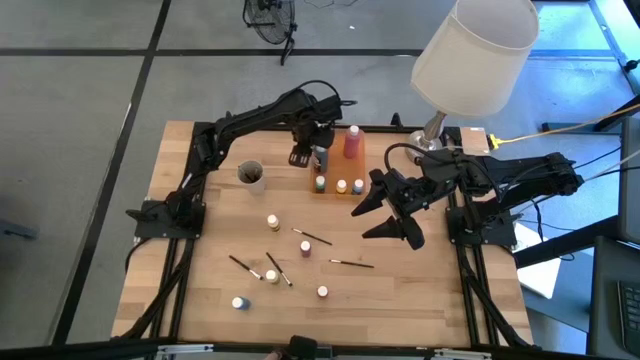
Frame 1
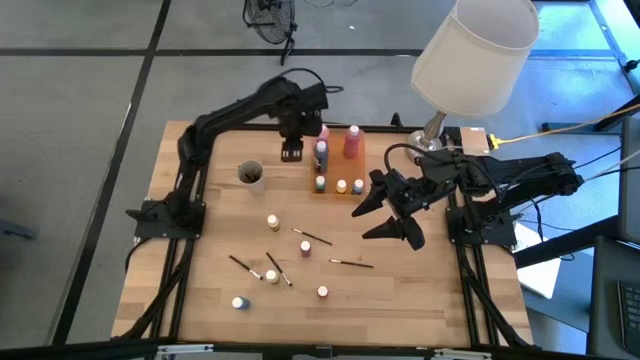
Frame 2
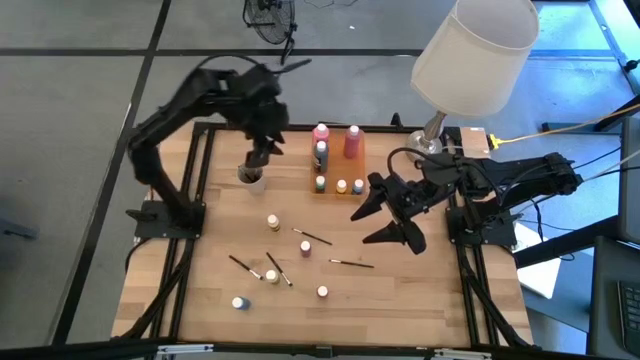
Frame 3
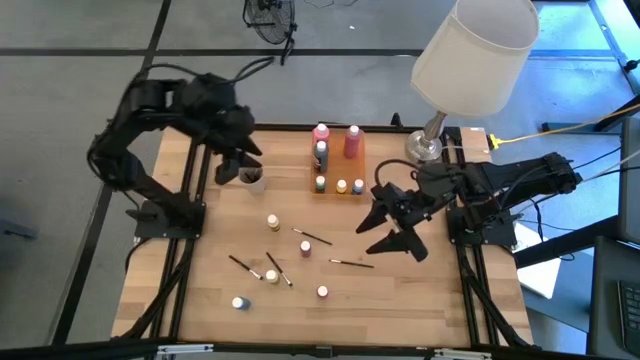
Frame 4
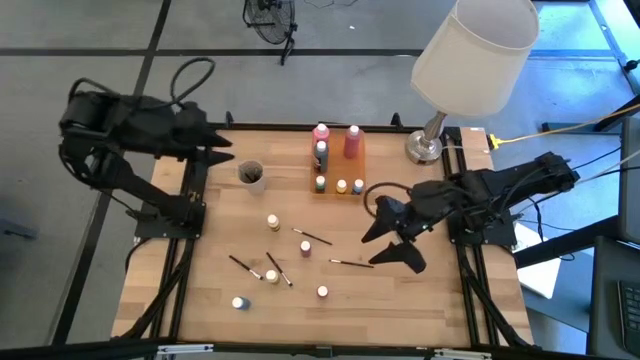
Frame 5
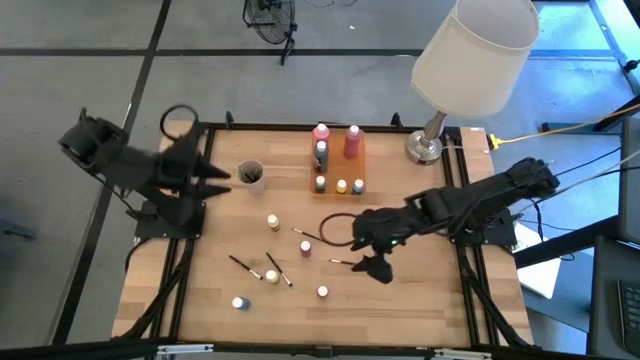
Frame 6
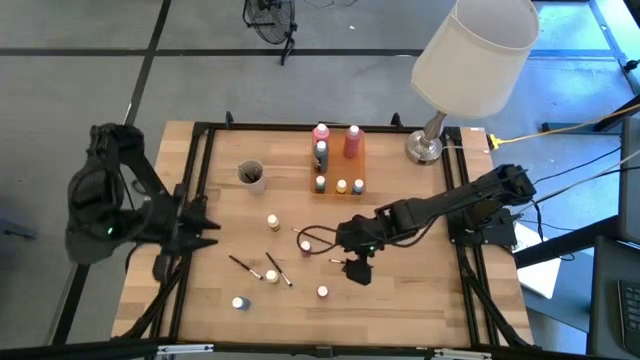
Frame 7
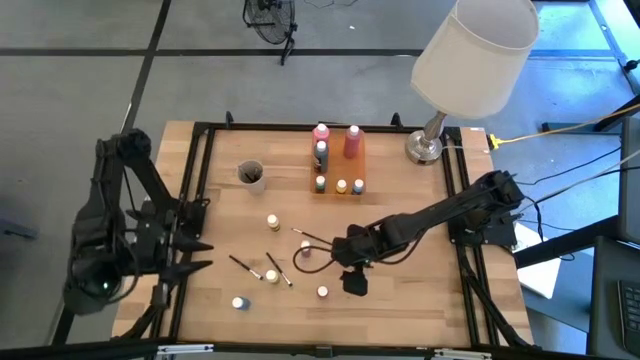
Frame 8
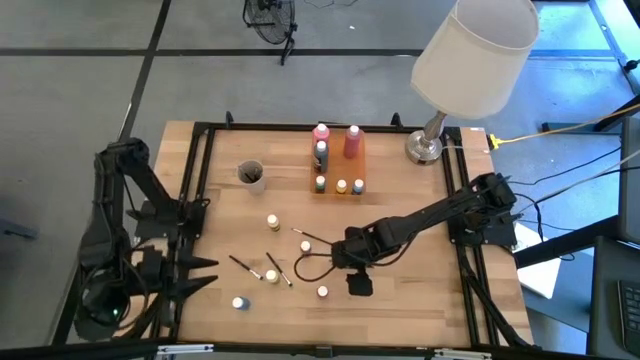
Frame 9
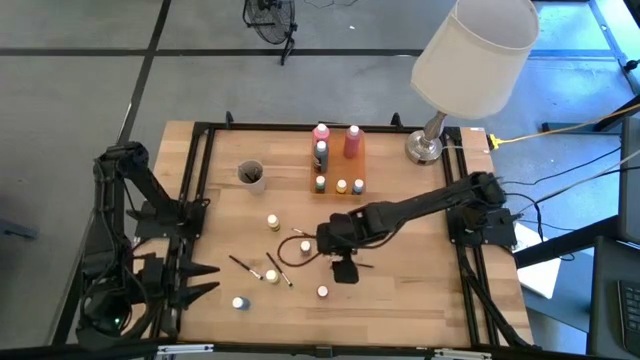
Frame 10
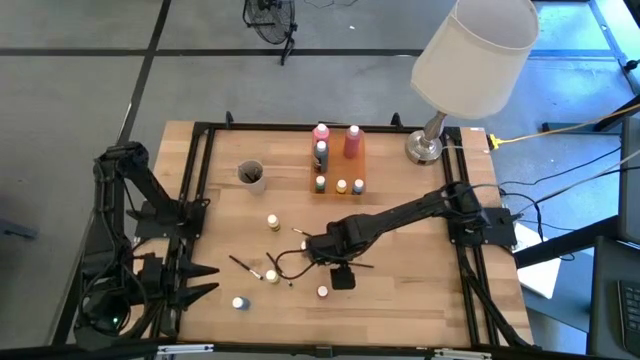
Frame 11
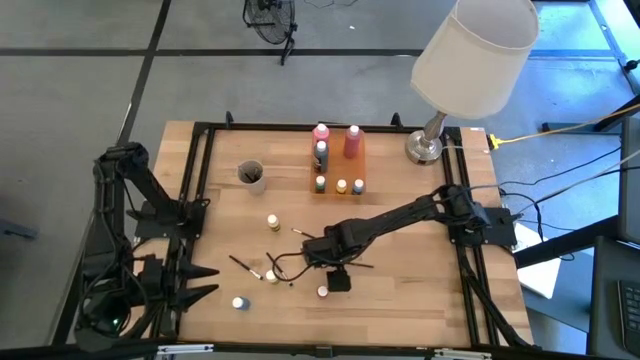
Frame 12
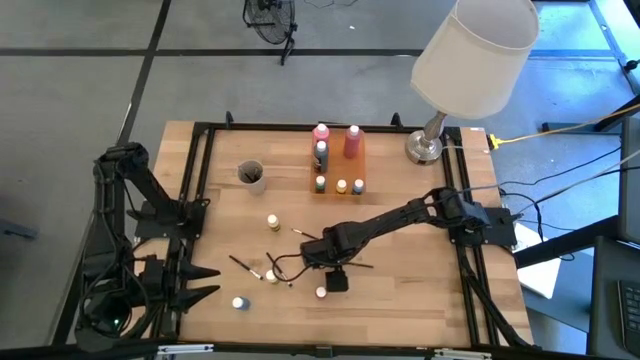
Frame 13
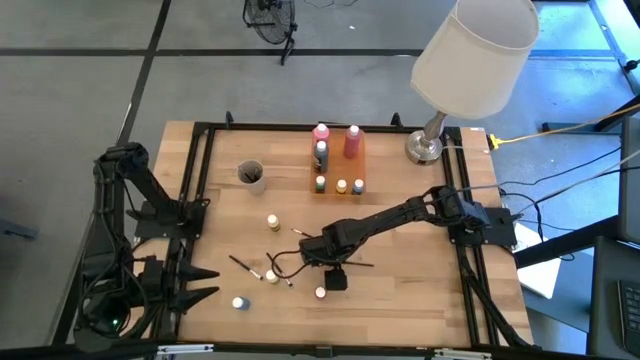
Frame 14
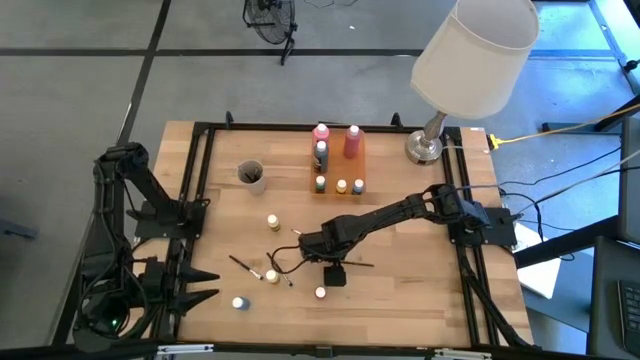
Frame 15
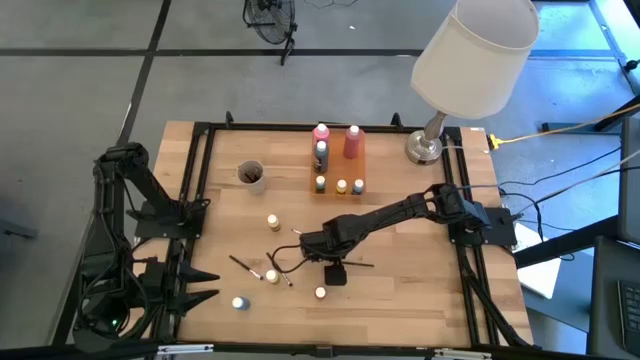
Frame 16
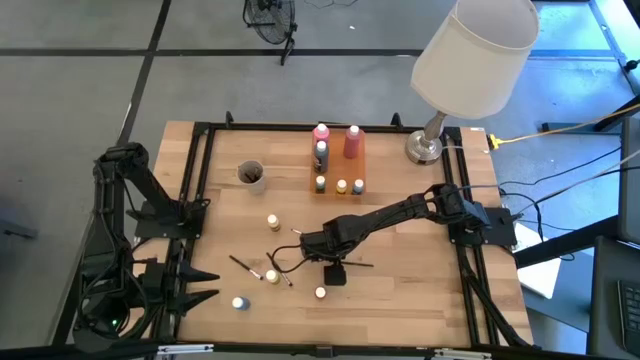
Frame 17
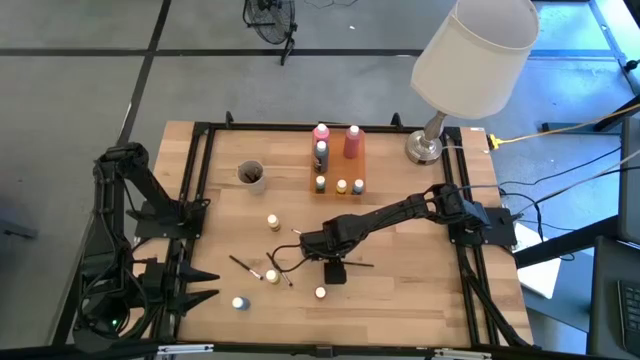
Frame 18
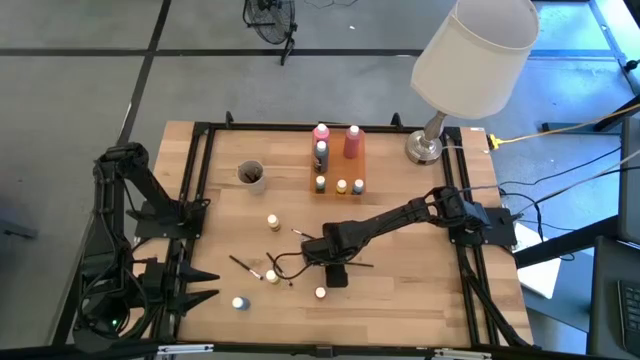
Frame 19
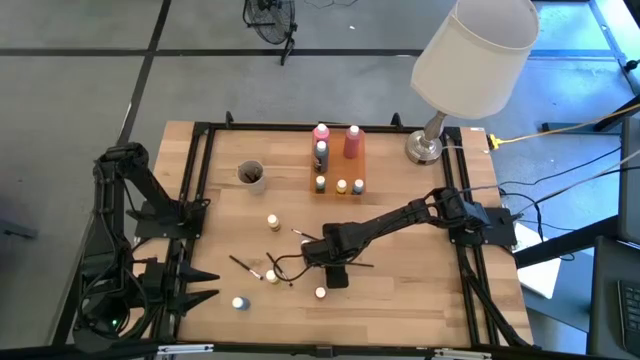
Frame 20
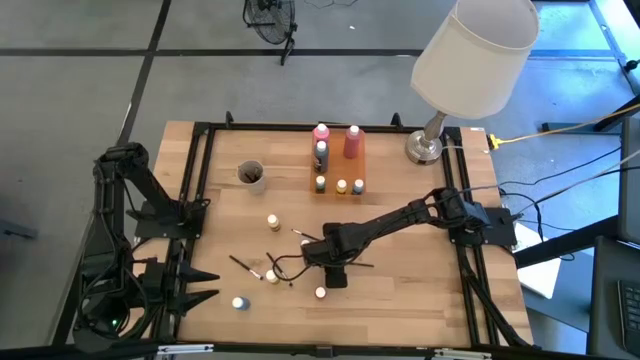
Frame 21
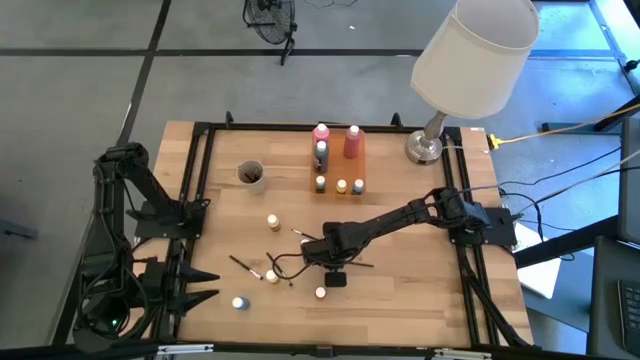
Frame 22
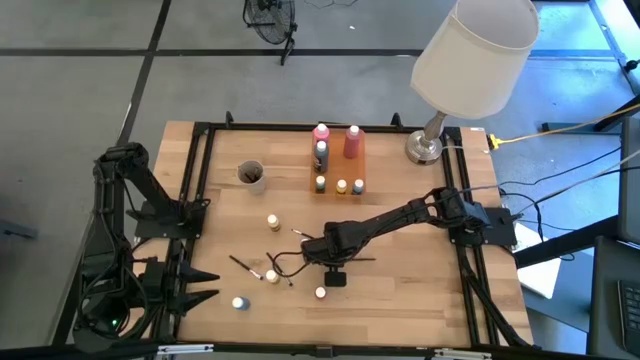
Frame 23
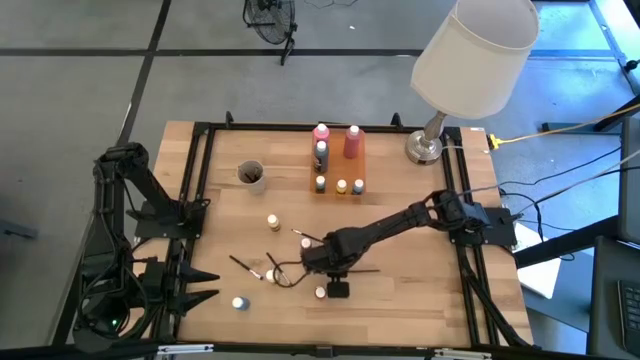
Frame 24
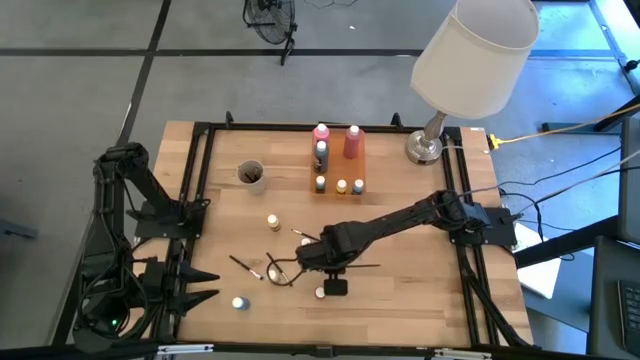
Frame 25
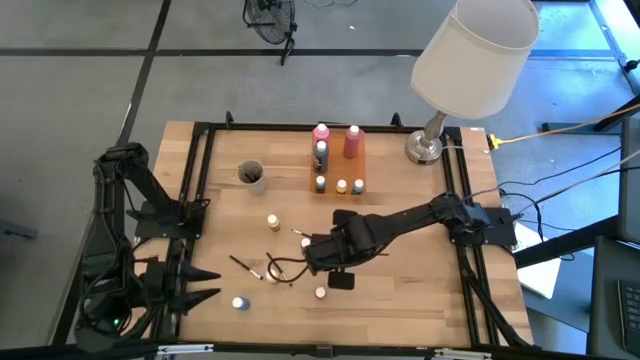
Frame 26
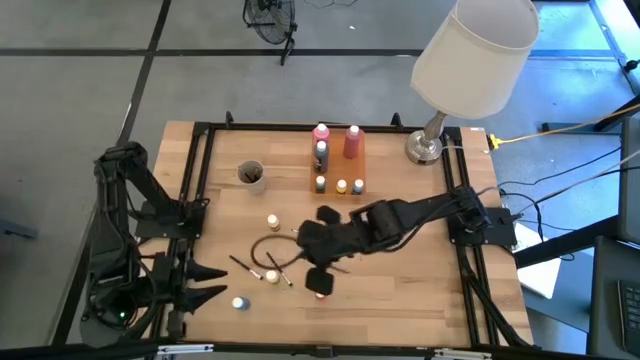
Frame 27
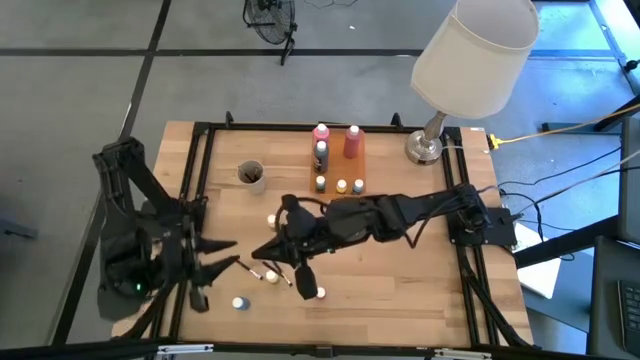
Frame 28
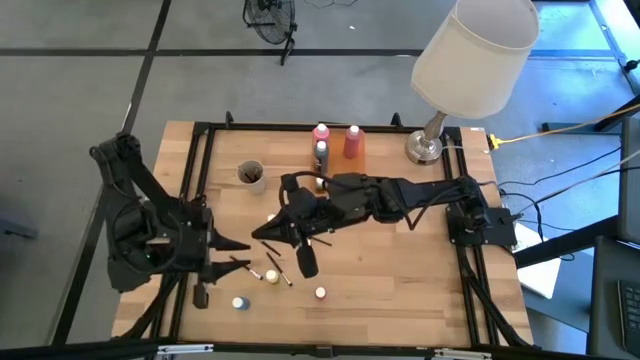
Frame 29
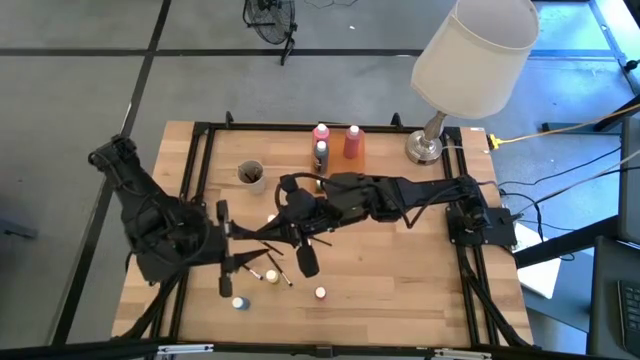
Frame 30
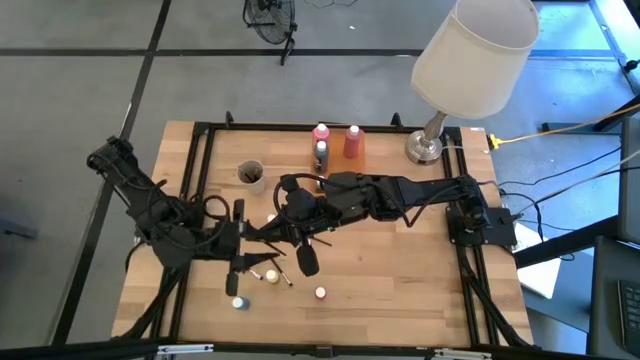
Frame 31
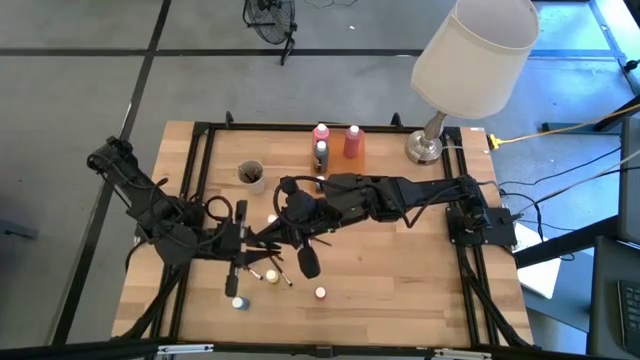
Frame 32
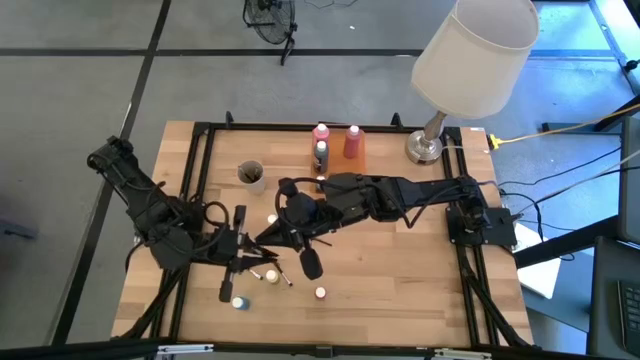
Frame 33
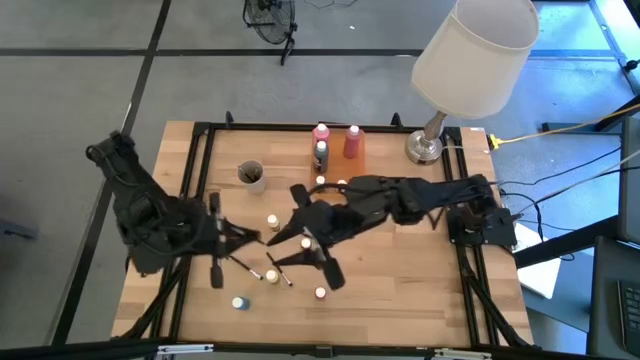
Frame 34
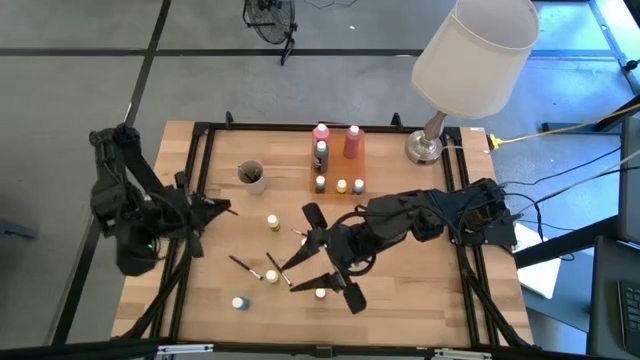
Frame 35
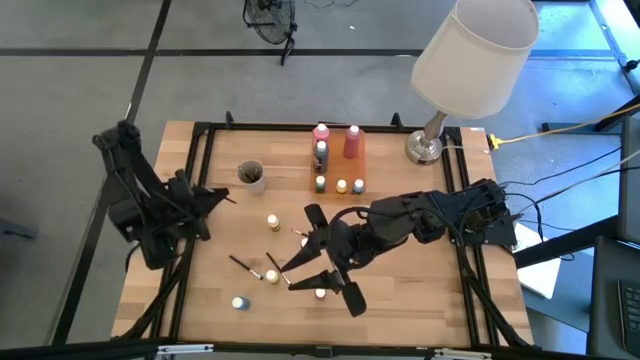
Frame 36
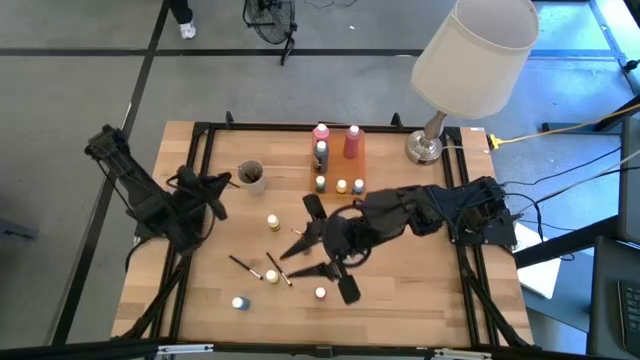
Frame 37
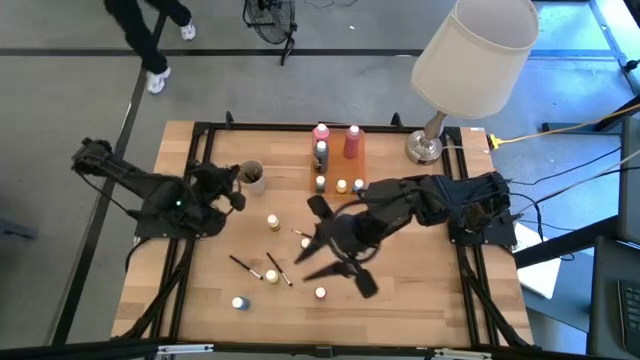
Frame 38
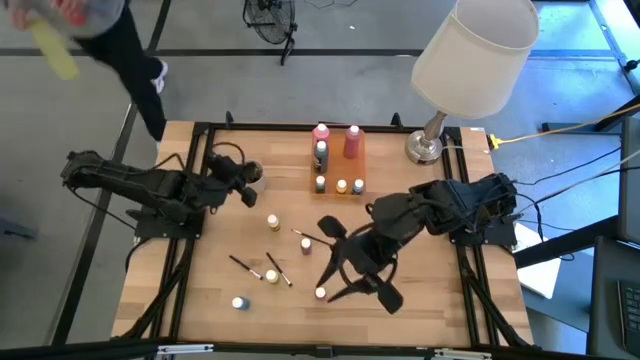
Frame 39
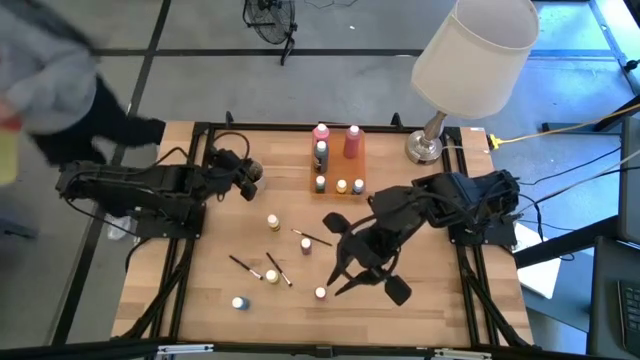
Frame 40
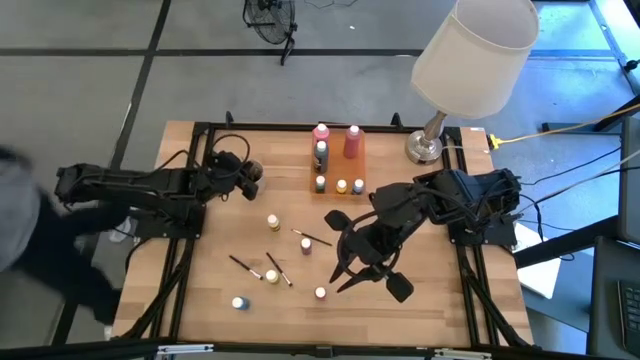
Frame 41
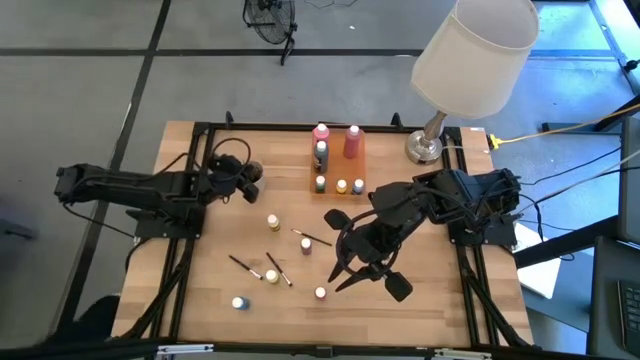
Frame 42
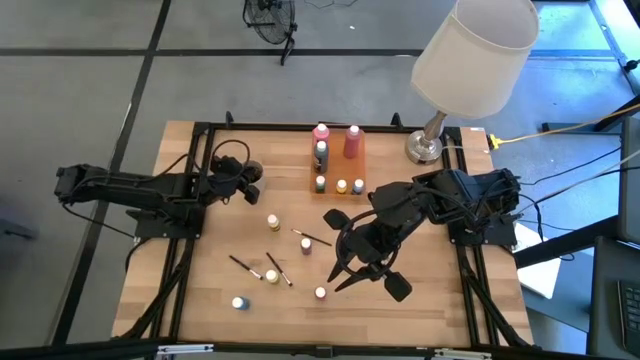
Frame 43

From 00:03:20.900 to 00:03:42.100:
Task: Pick & Place Paint Supplies
Put the silver paint brush into the white cup
